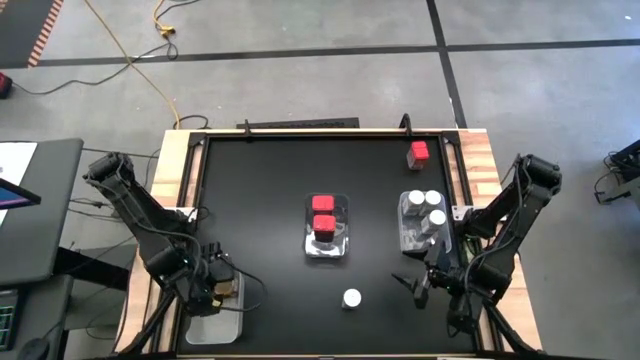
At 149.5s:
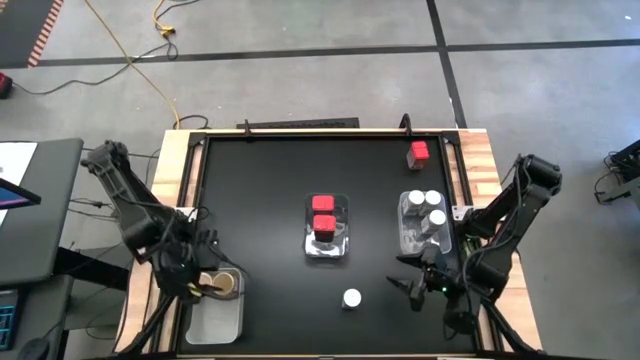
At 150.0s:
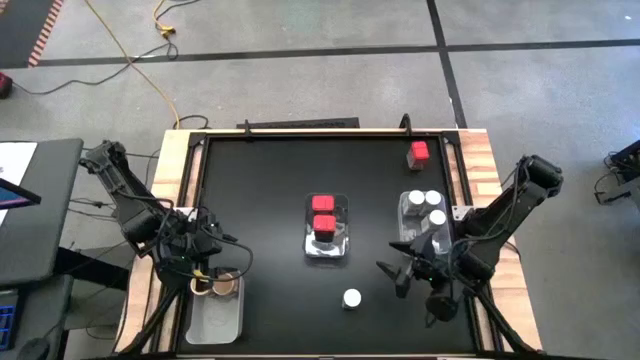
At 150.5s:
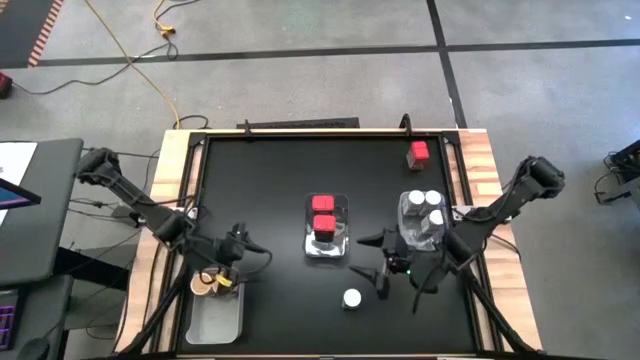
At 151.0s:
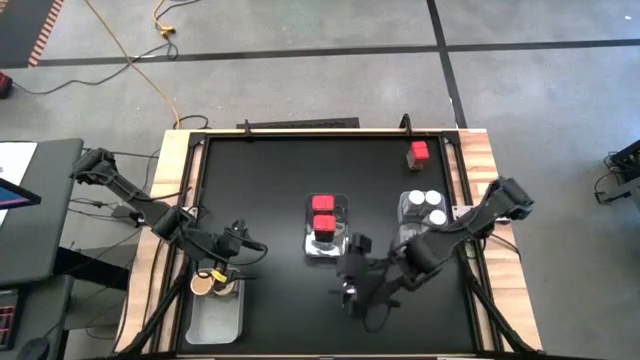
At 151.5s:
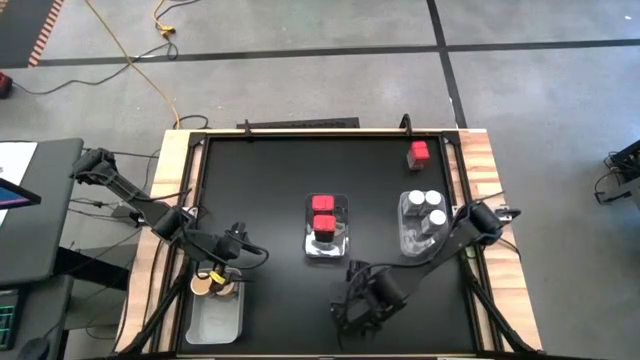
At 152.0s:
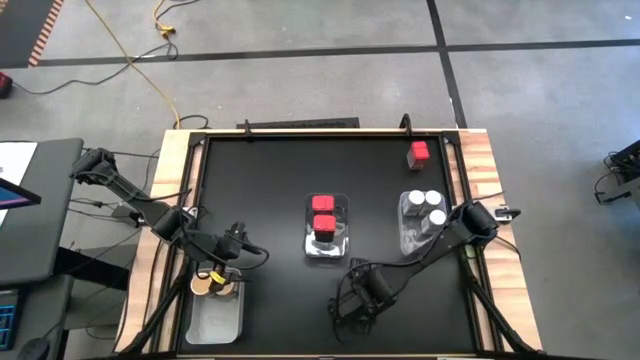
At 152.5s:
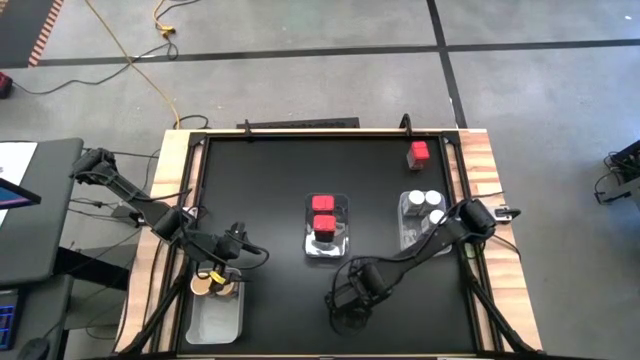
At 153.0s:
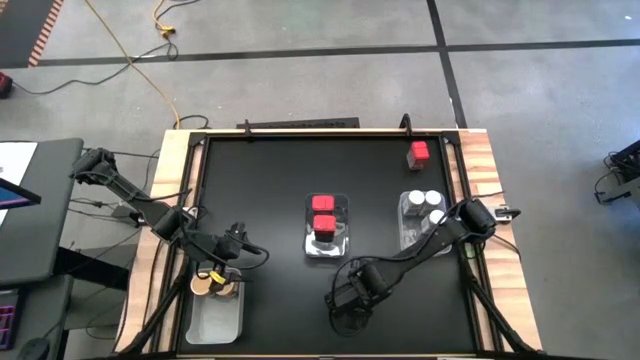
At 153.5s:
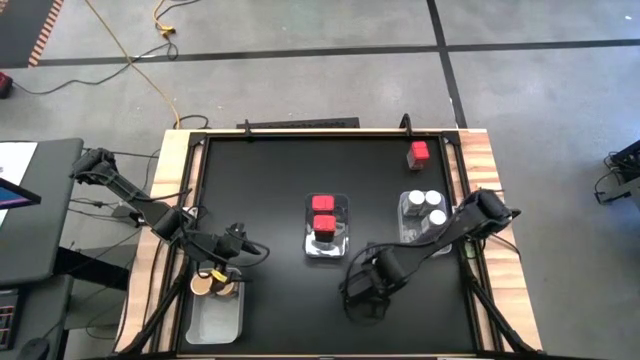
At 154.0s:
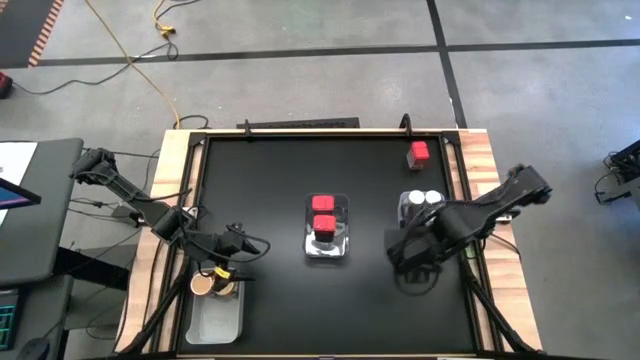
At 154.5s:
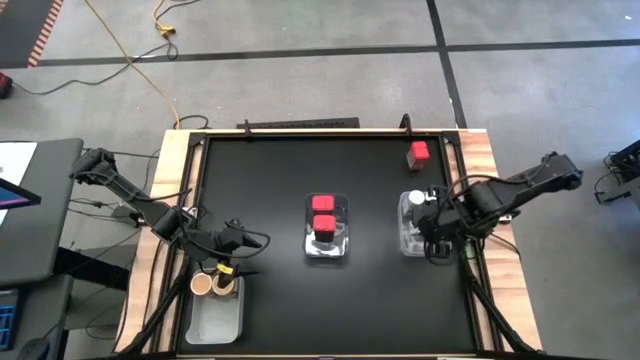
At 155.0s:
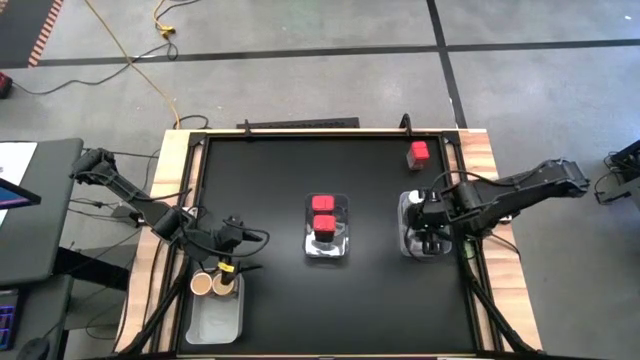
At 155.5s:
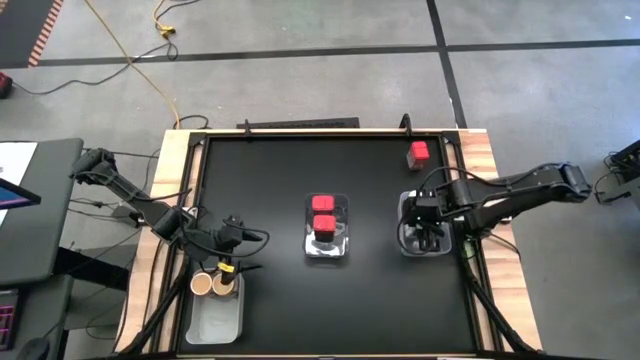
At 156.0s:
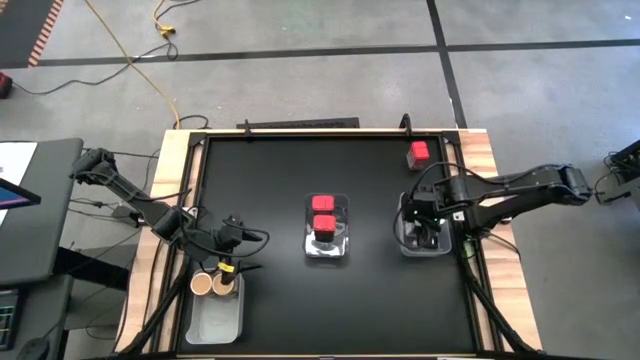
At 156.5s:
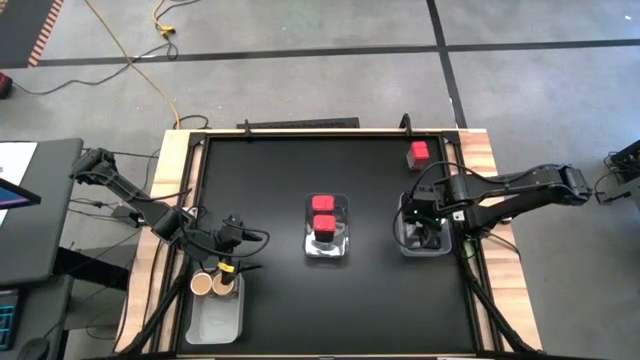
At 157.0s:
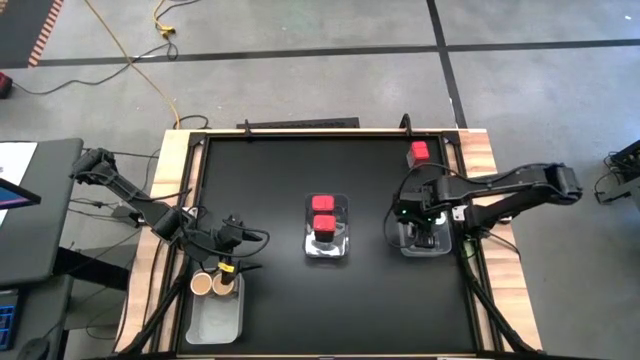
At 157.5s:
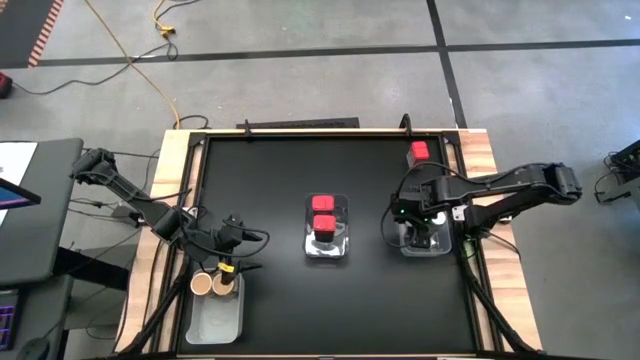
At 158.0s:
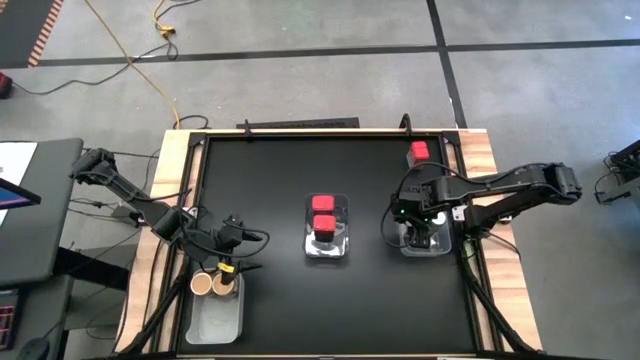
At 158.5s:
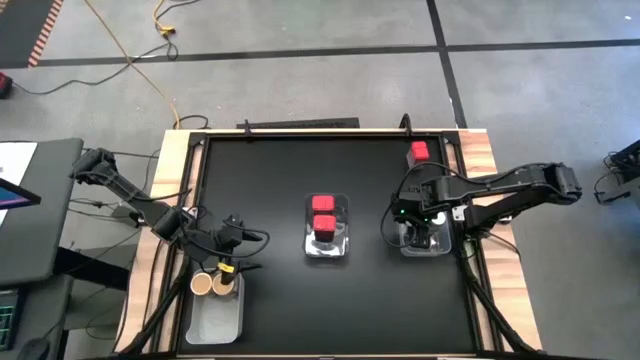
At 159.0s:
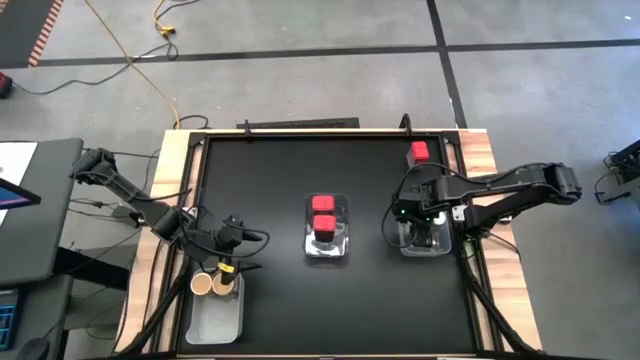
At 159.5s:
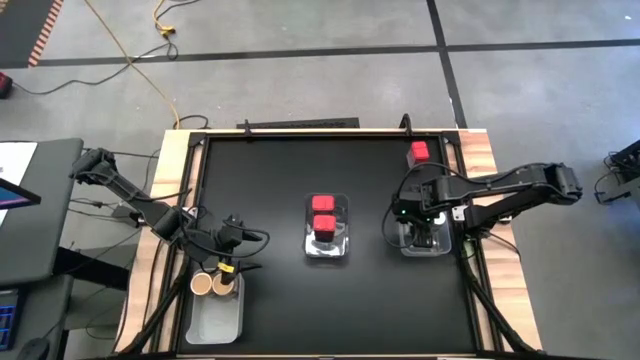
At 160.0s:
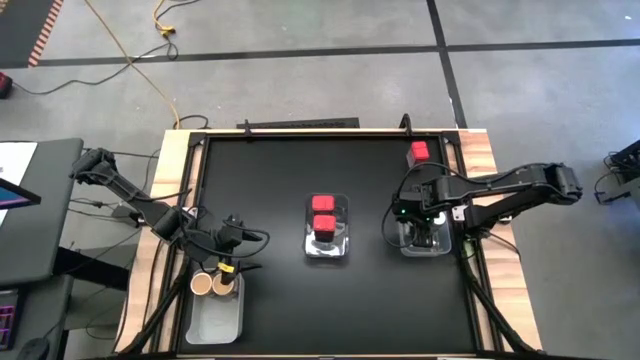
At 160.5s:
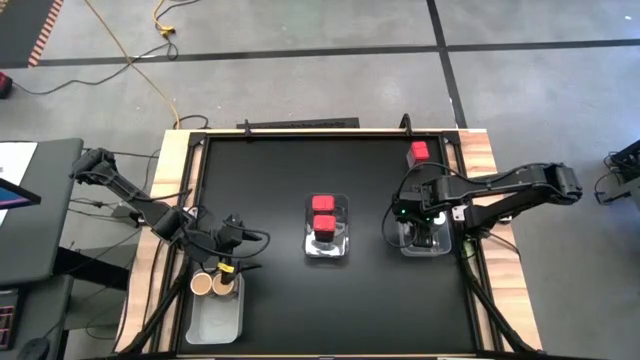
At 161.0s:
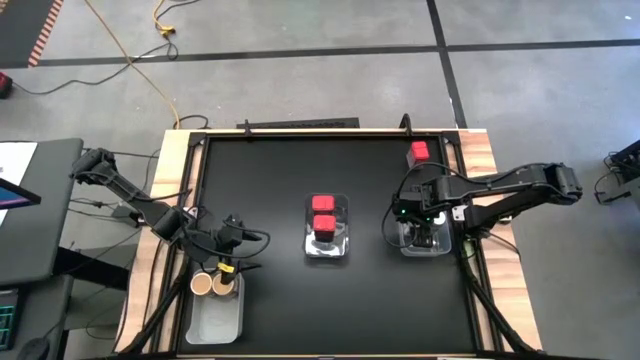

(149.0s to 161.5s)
Task: Sort spices by type
Put the white seasoning bottle into the transparent bin

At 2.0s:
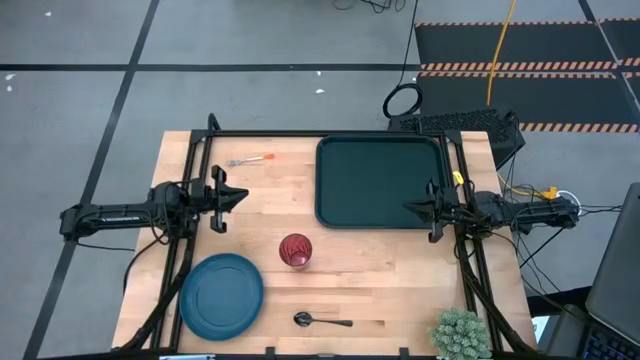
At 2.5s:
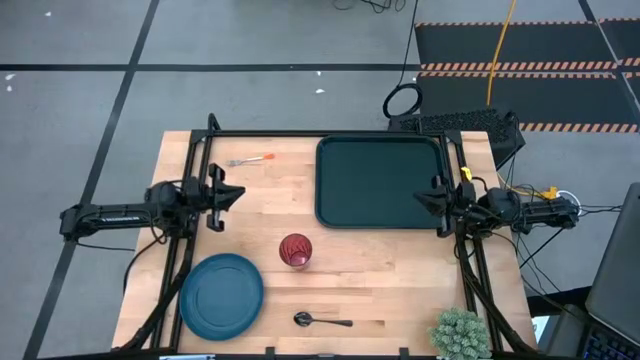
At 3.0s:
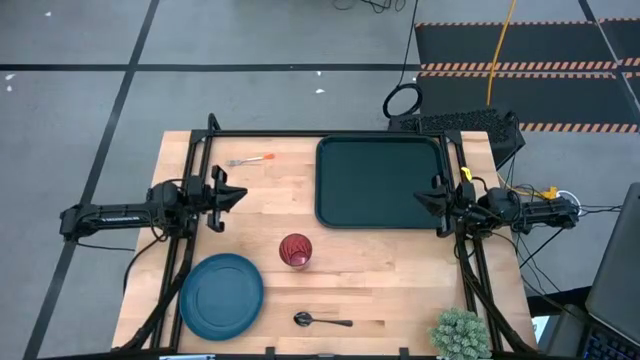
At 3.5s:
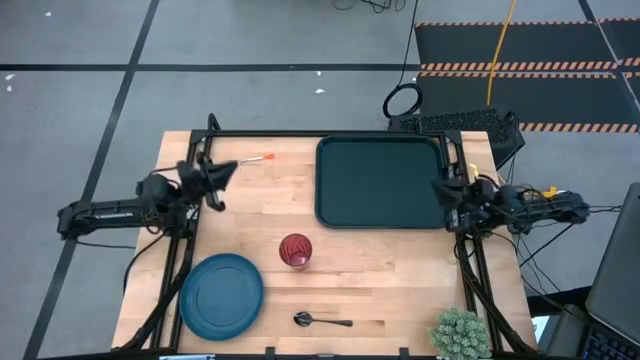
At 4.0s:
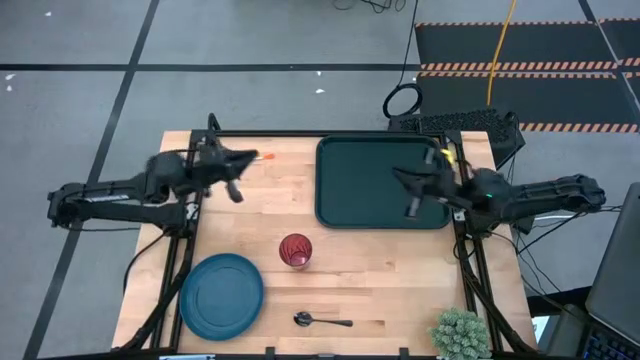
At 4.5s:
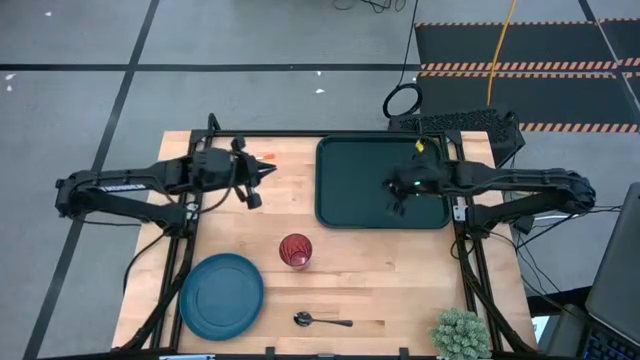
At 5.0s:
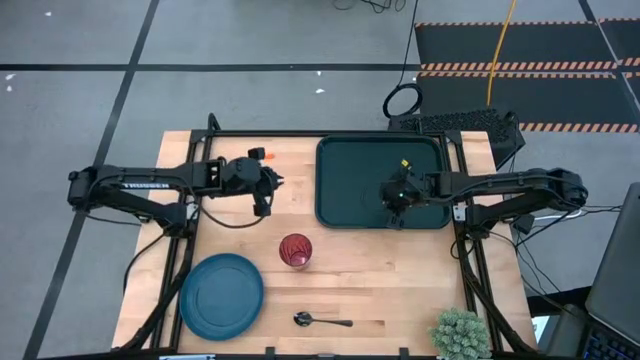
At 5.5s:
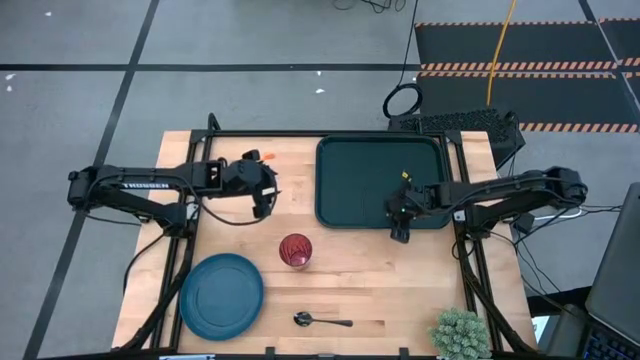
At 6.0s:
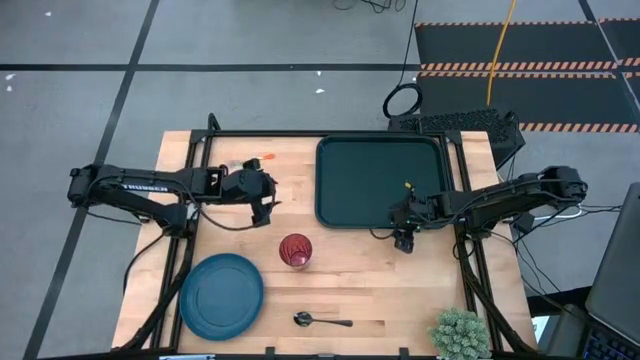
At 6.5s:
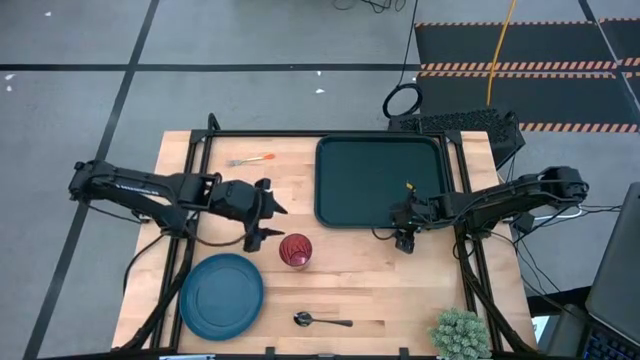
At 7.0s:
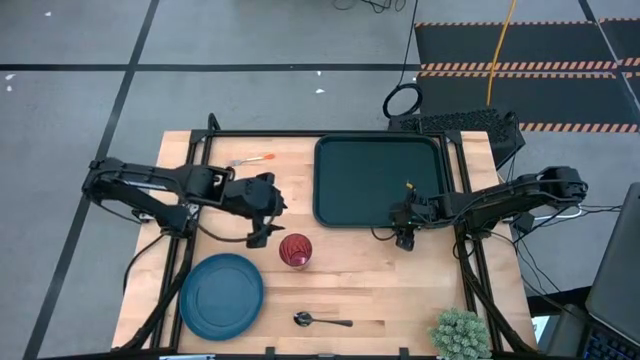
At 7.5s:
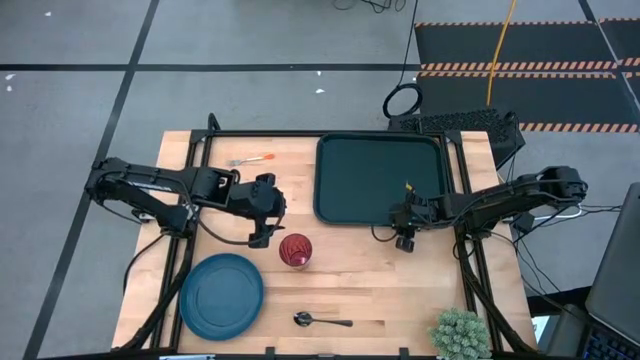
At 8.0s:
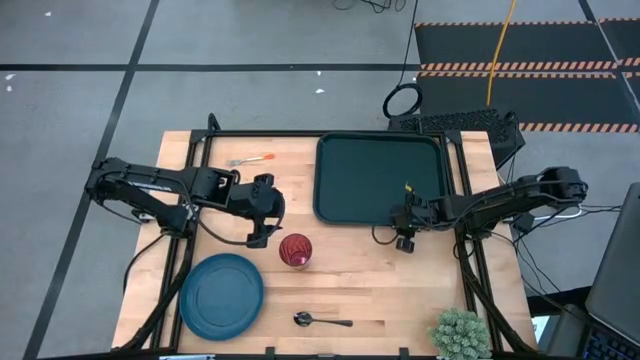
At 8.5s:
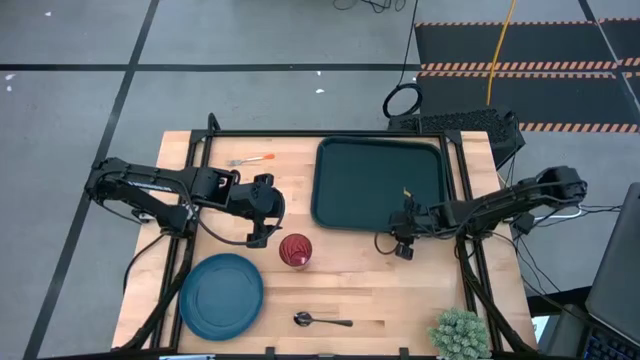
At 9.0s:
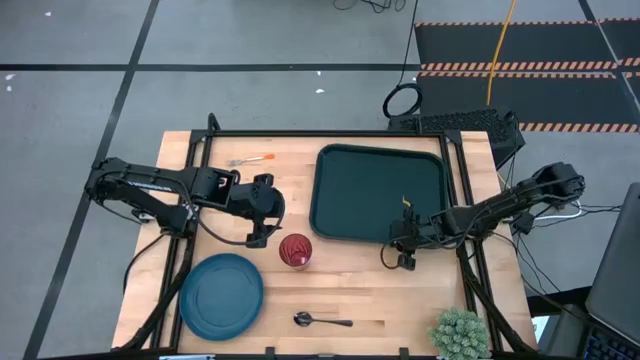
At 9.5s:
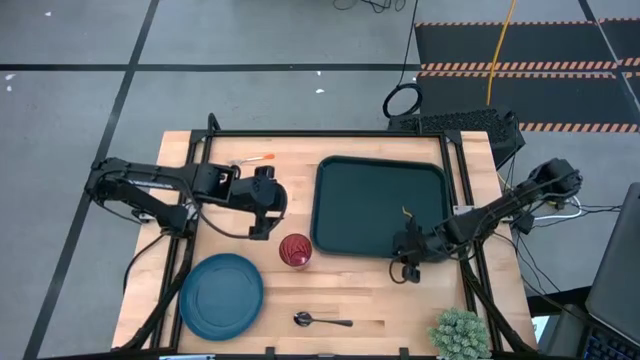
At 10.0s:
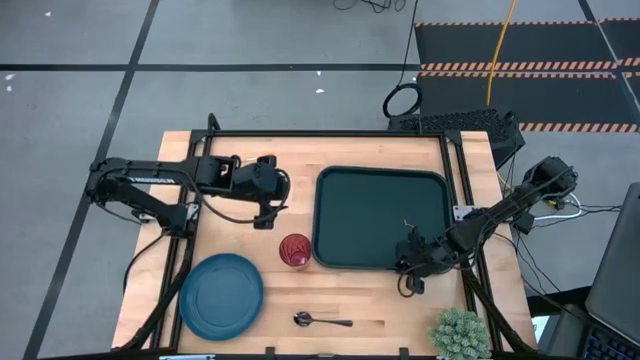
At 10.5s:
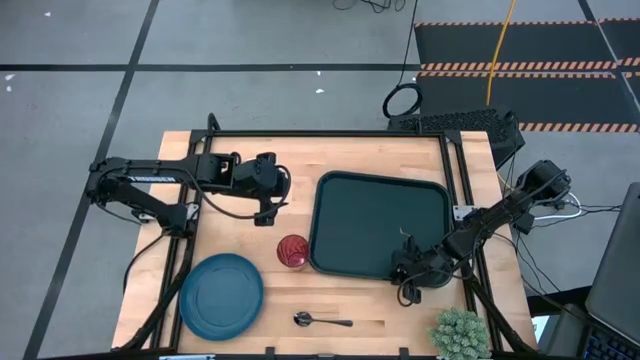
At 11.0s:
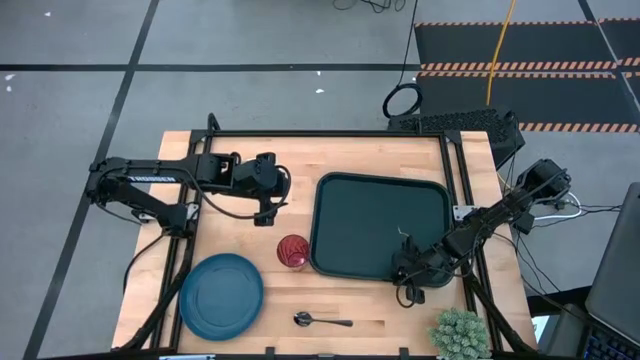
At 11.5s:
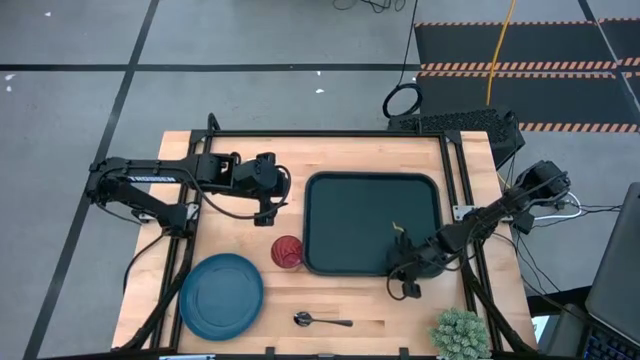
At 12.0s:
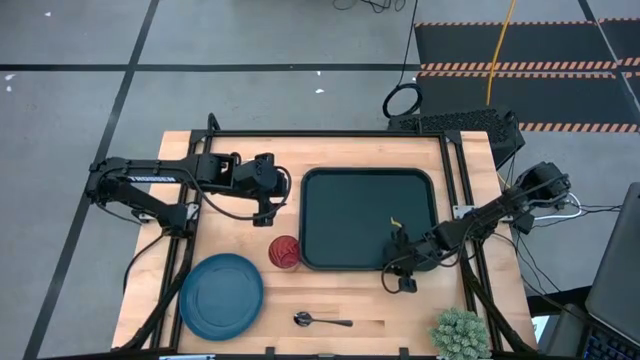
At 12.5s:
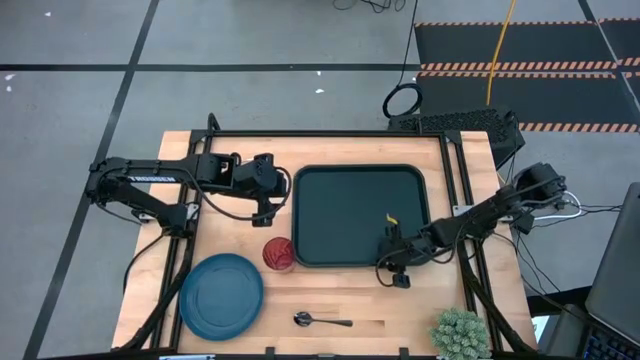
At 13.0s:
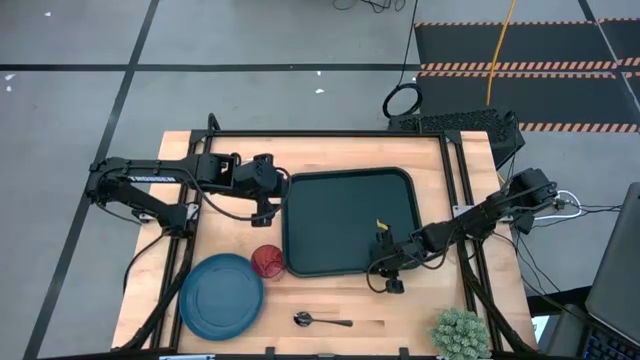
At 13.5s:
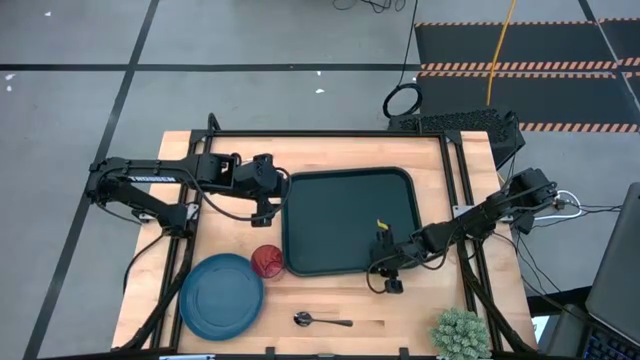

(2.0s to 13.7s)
Task: Pick and place plate/cup/fork/spoon on tray
Move the black tray to the center of the table
